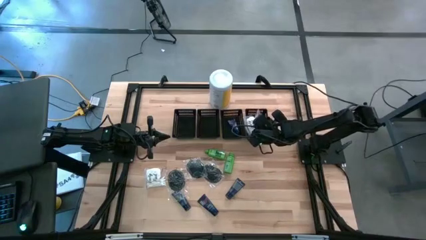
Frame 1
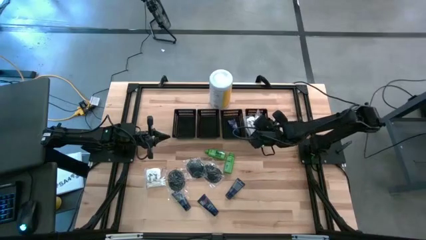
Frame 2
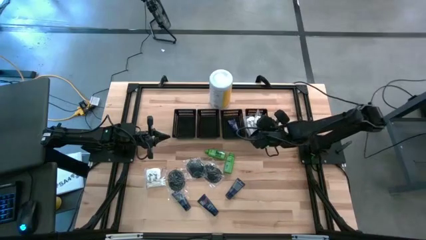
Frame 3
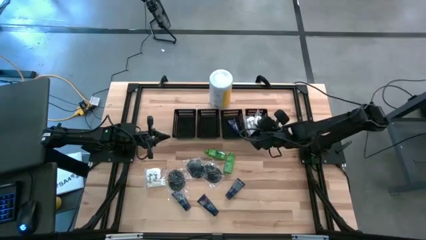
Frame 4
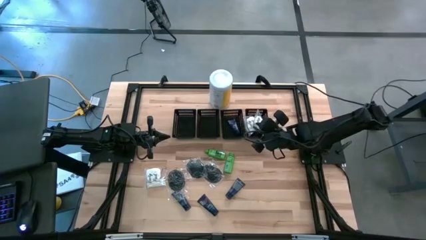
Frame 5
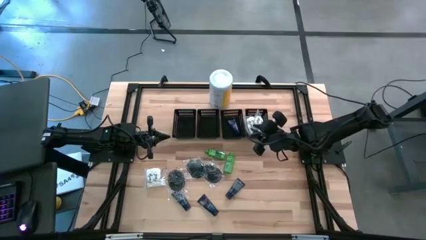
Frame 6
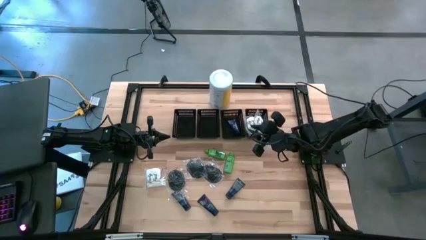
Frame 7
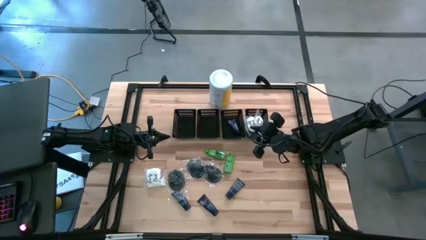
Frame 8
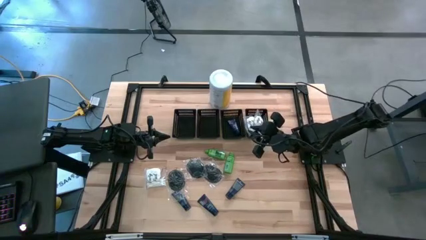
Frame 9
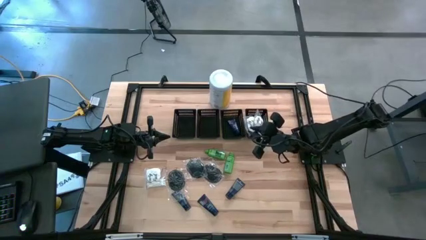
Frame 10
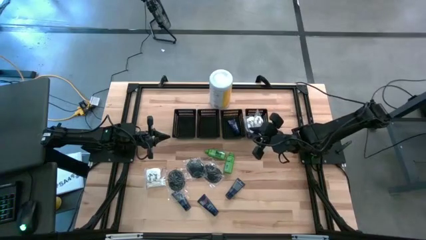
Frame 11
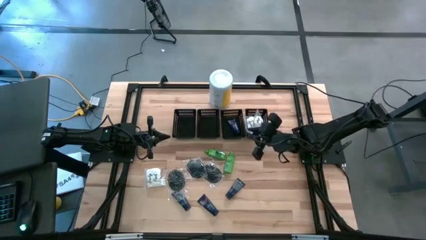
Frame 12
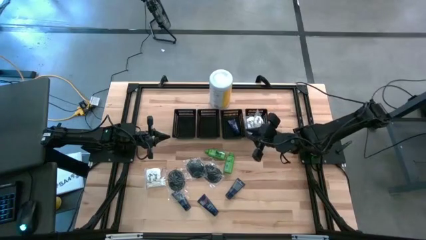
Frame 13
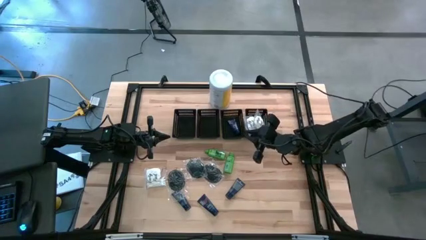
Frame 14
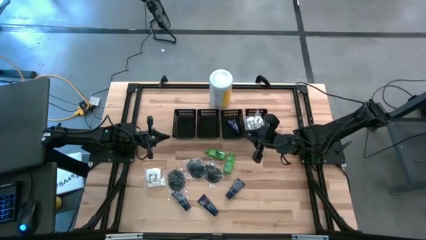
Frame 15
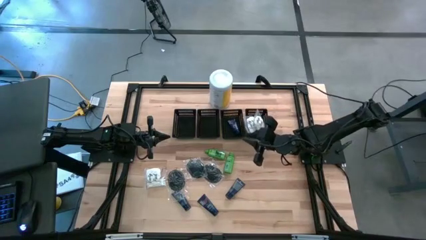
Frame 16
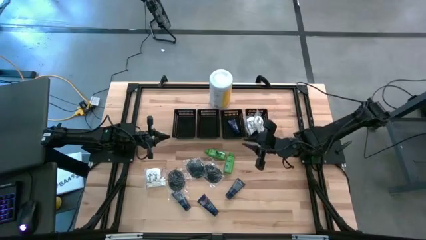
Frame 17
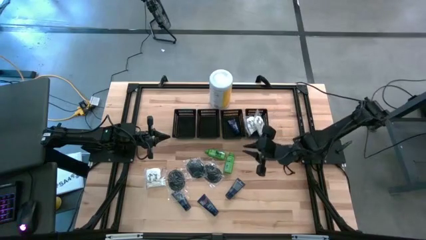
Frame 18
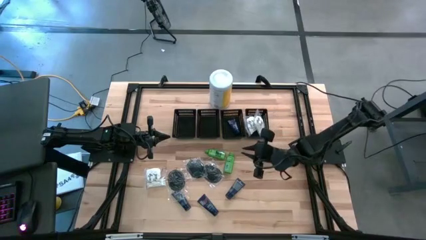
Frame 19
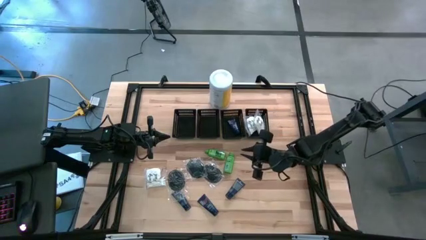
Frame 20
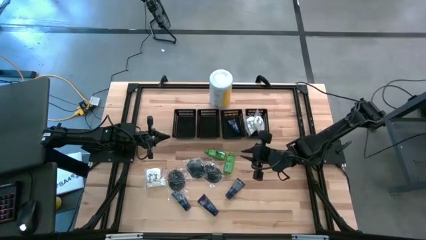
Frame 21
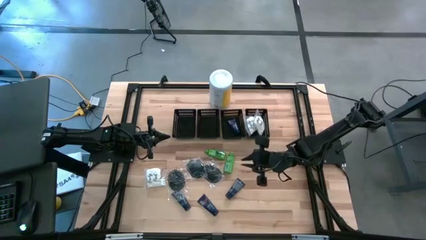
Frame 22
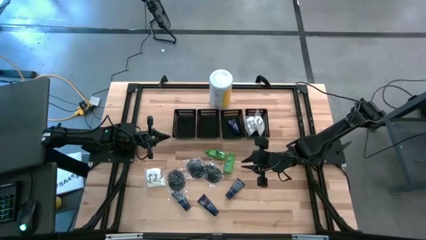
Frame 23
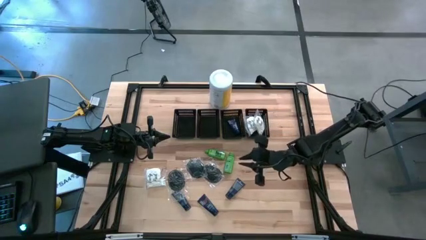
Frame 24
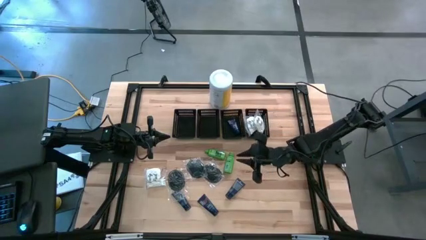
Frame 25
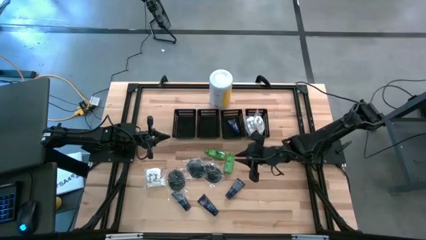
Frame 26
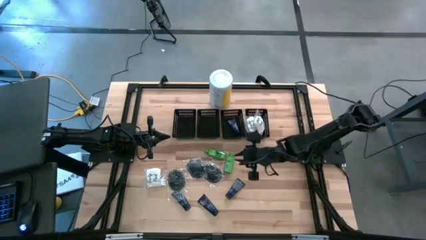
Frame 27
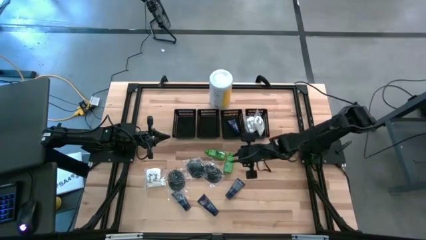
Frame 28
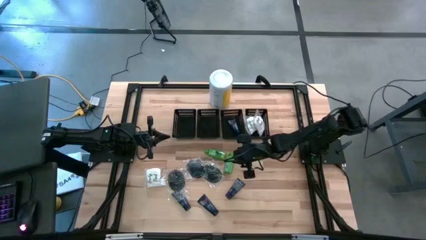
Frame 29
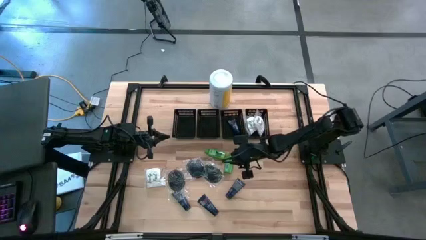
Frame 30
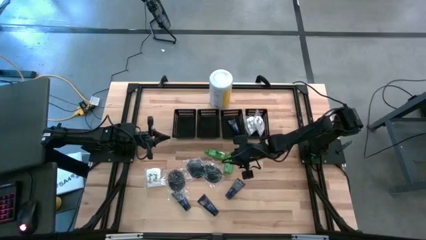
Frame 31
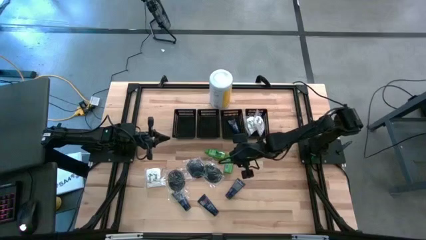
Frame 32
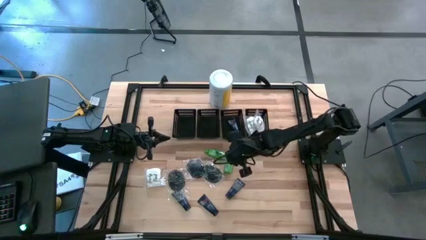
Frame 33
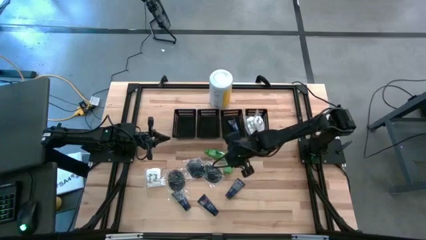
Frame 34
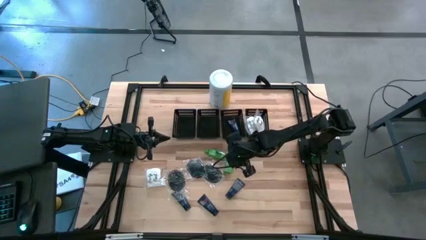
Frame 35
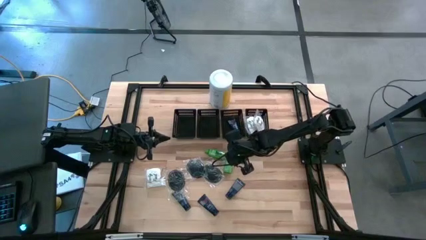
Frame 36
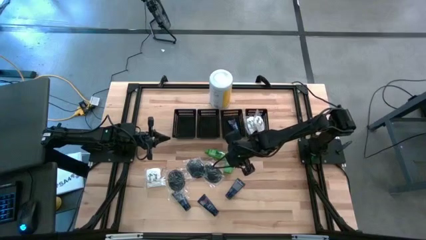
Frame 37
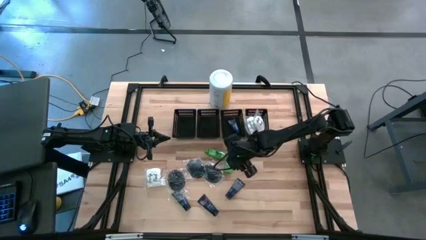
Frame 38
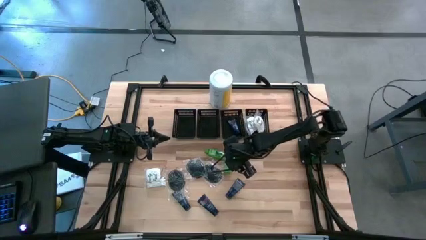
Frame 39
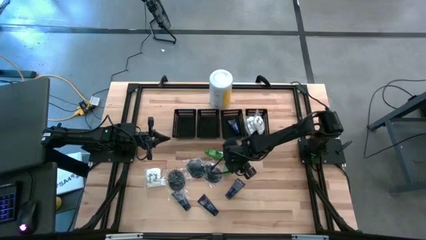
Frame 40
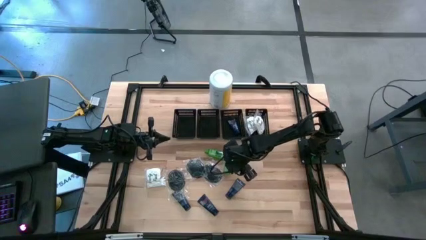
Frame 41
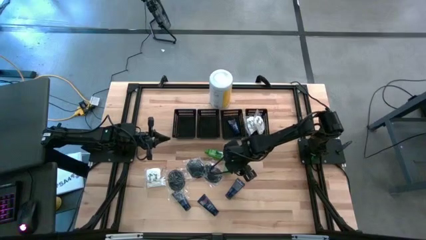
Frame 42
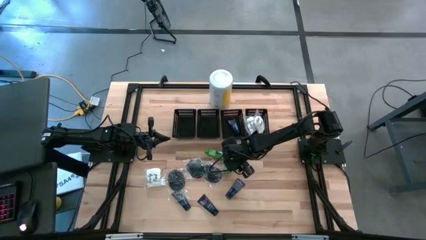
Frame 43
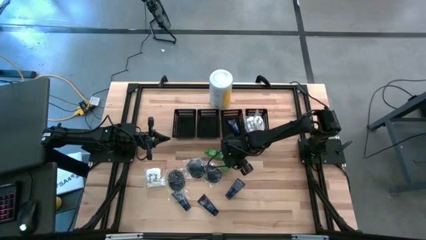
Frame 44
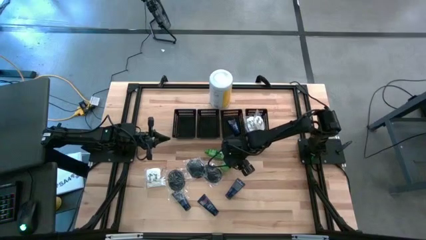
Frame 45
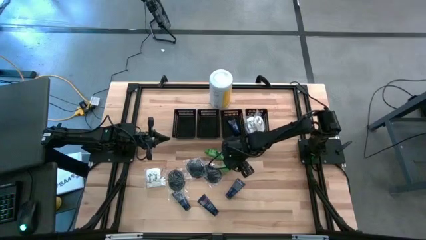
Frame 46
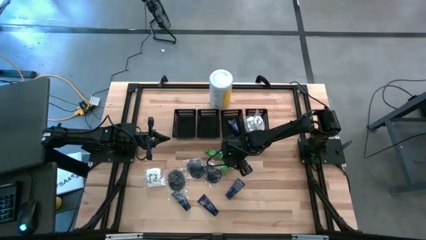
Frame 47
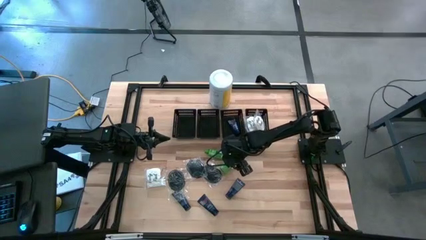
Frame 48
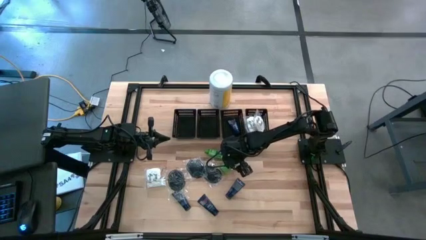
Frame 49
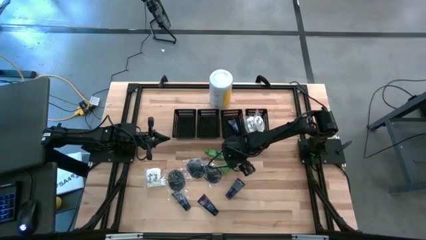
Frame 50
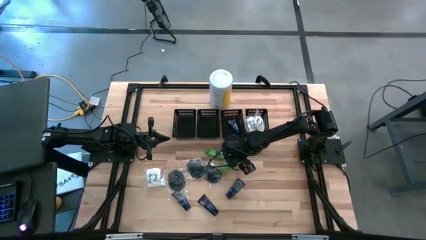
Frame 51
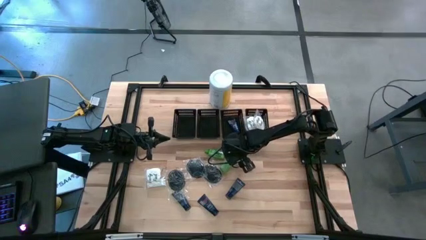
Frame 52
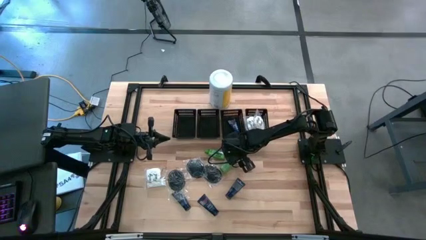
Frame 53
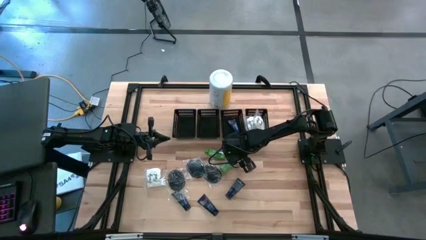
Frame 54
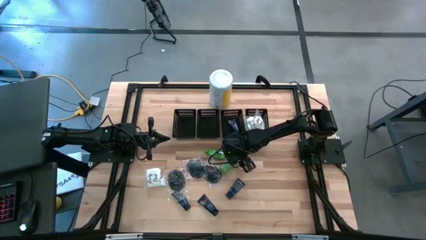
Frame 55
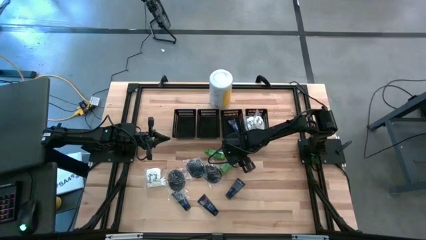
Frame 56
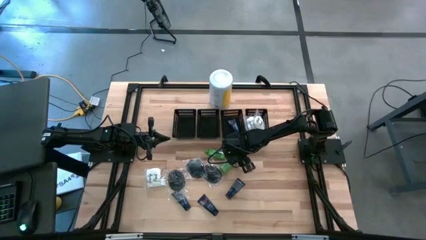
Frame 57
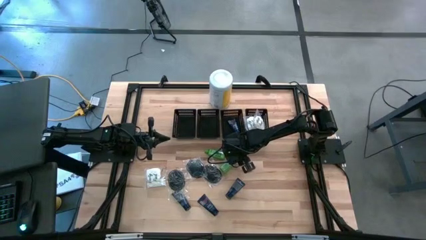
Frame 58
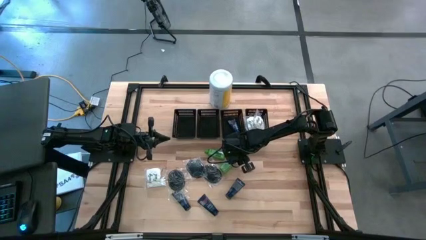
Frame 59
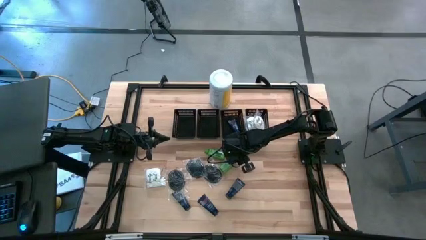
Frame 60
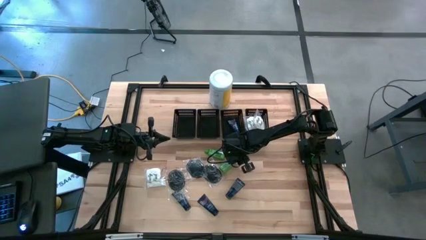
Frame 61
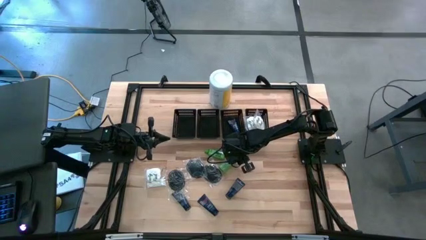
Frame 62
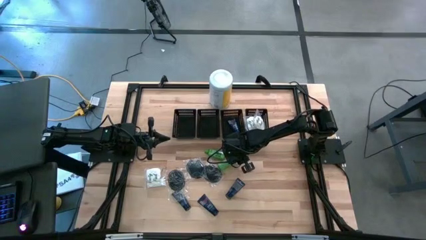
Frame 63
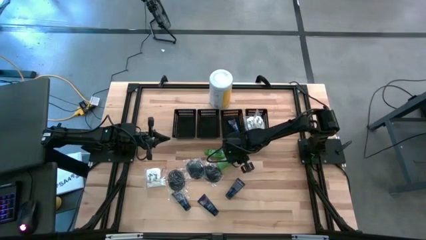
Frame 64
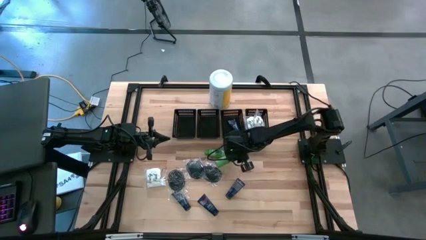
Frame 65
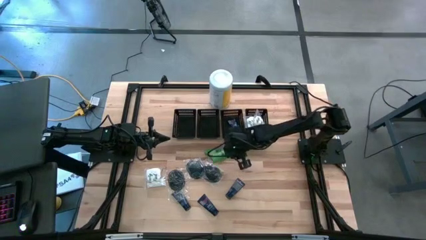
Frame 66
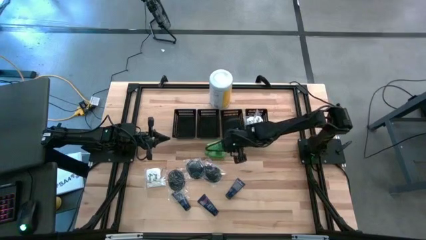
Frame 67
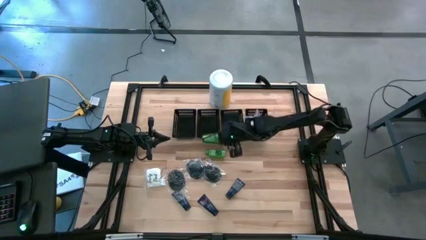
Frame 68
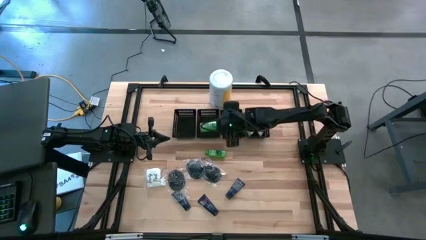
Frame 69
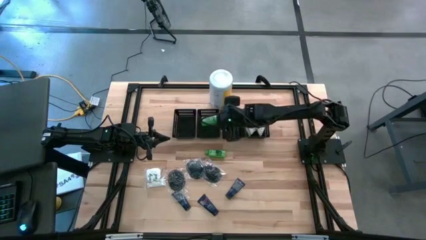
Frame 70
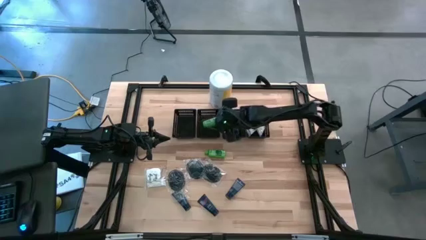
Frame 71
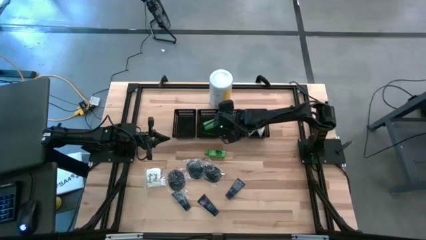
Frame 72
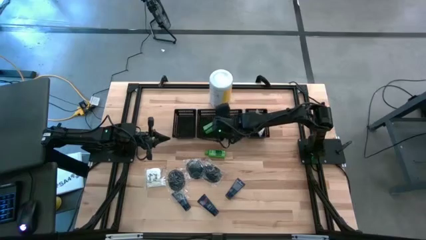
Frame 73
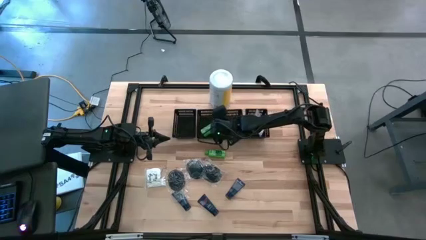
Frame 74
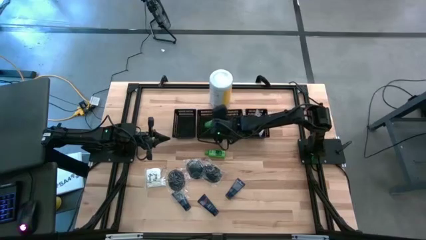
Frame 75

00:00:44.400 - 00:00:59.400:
Task: Pick & Place Travel size toiletries
Put the right shampoo into the middle left black bin

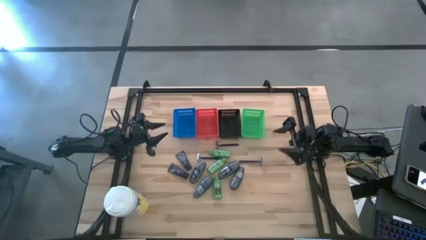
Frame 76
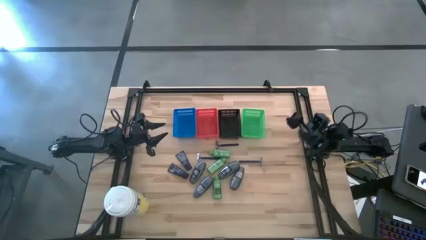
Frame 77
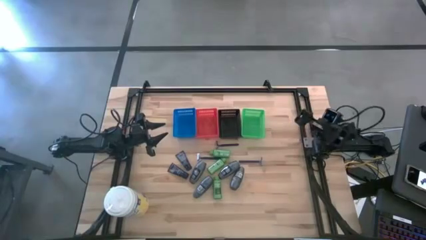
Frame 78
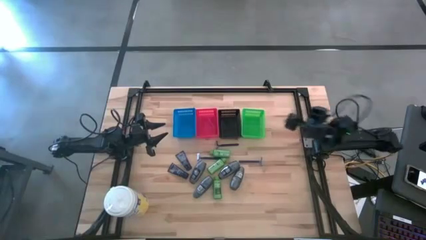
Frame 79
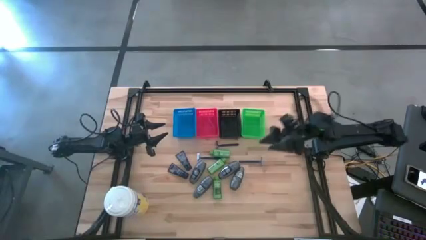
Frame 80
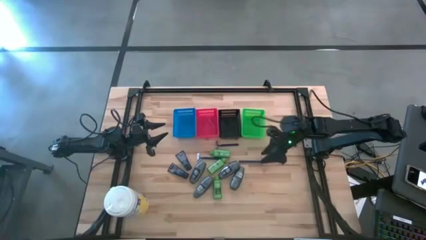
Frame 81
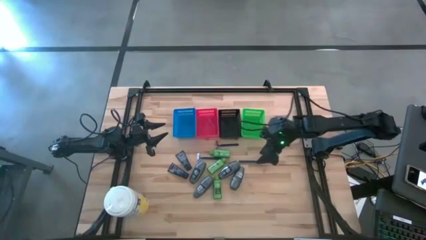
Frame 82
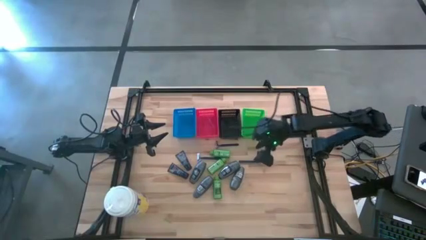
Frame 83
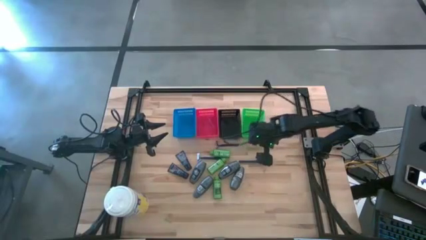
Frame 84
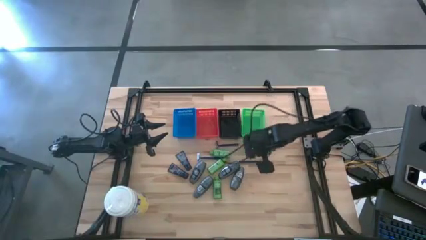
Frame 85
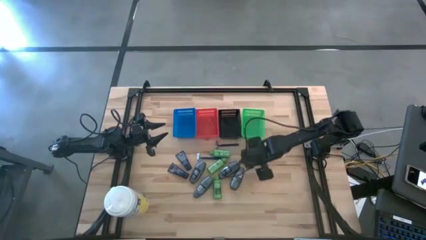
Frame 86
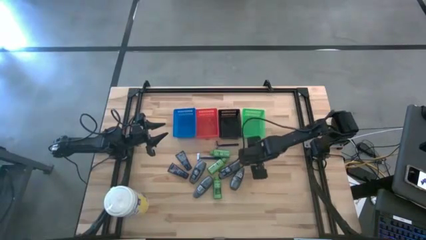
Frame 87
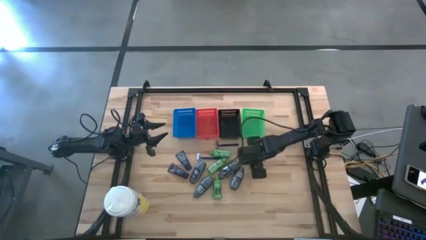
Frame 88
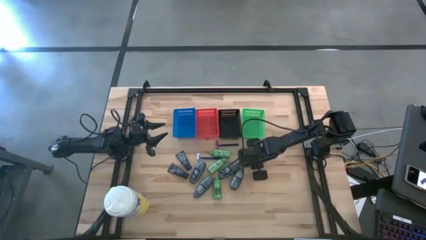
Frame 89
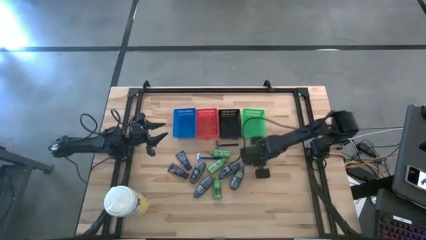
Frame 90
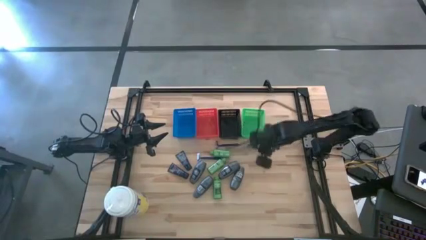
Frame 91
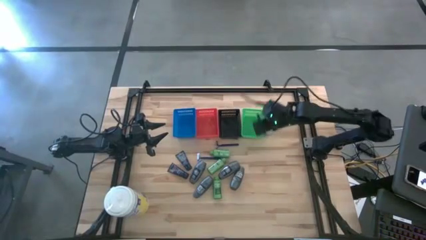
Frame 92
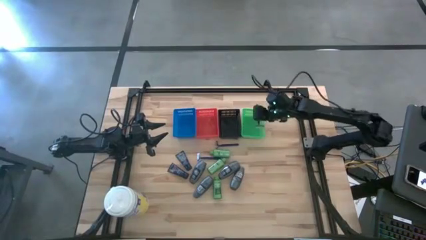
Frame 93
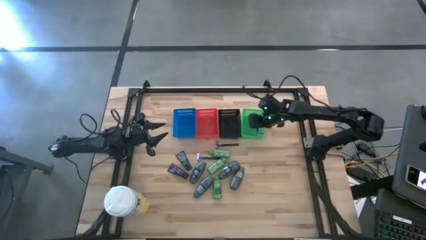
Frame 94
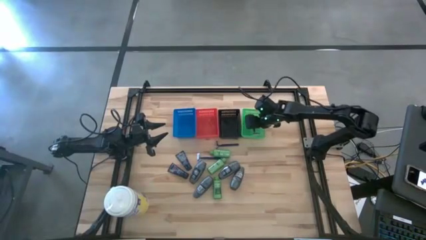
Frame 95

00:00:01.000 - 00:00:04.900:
Task: Pick & Place Travel size toiletries
Put the blue razor into the green bin
